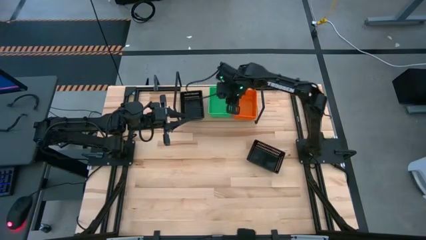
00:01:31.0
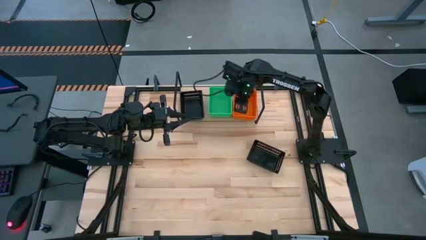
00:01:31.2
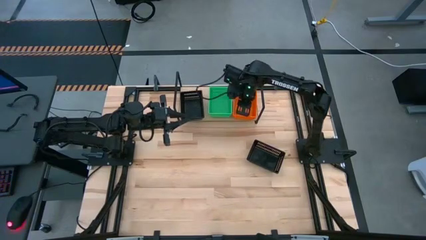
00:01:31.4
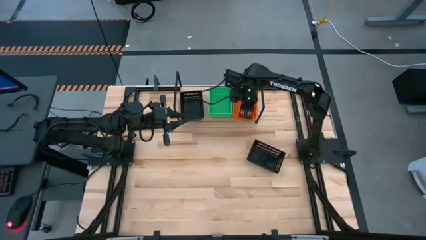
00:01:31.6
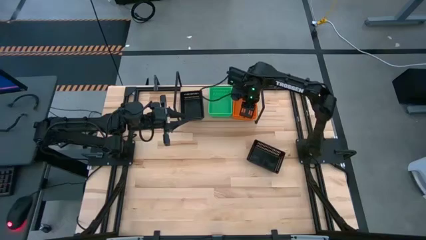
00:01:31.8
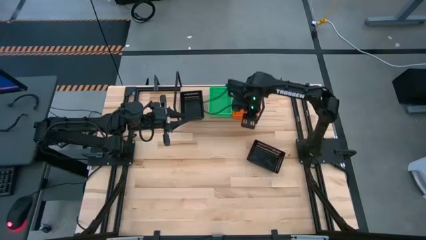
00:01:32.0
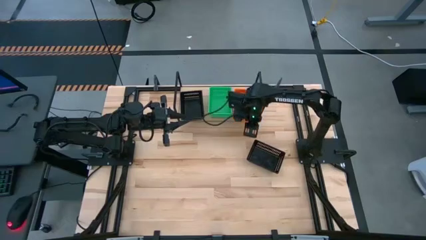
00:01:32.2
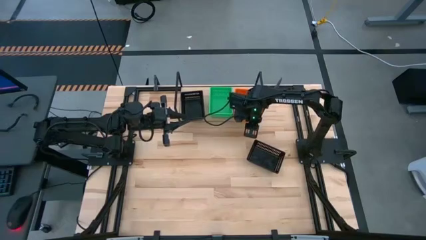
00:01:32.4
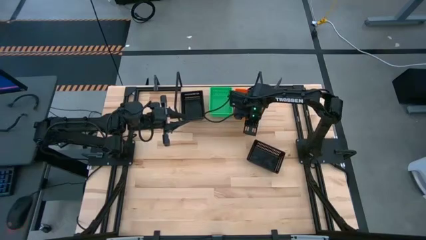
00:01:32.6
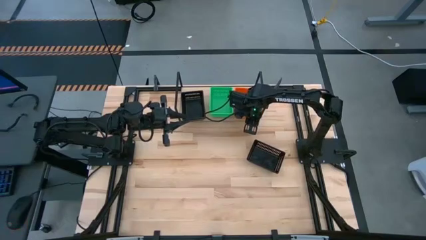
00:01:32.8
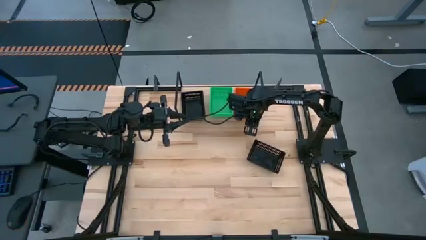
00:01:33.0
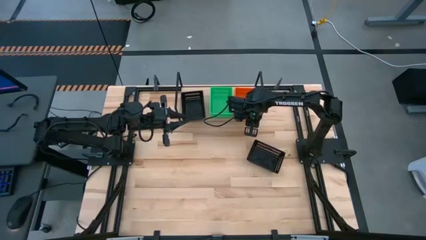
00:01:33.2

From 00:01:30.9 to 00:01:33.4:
Task: Stack baskets on shelf by color
Adjust the stacked orange bins on the shelf

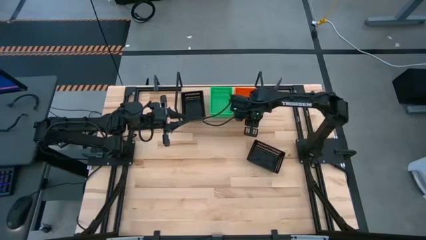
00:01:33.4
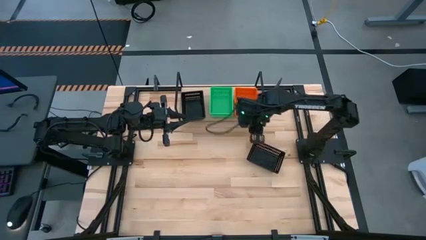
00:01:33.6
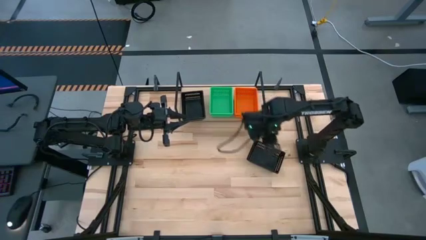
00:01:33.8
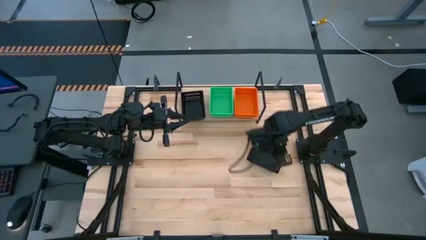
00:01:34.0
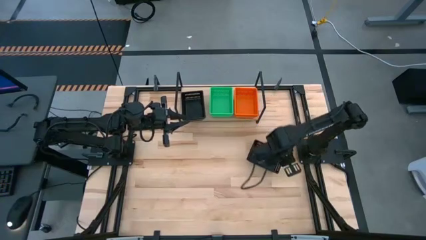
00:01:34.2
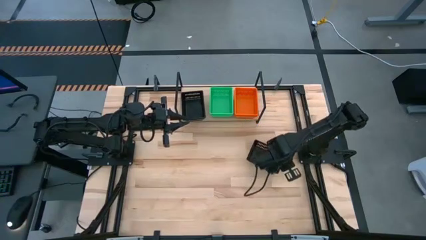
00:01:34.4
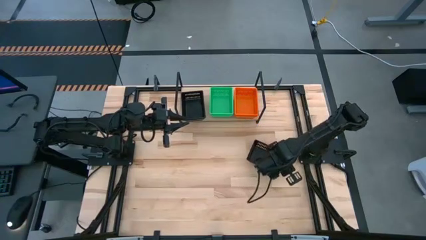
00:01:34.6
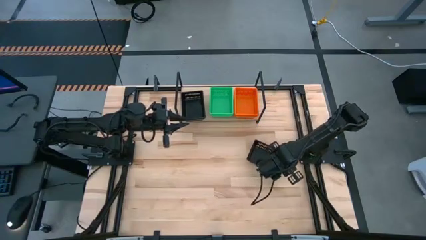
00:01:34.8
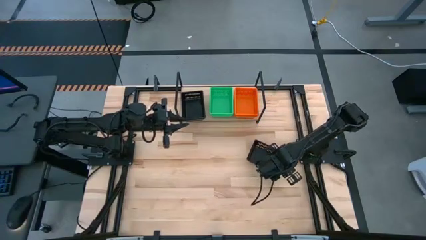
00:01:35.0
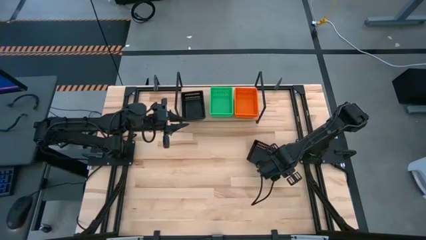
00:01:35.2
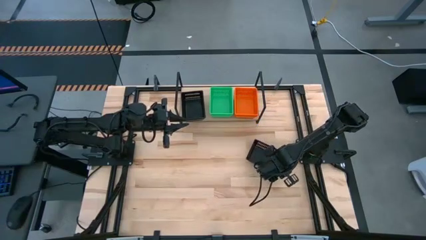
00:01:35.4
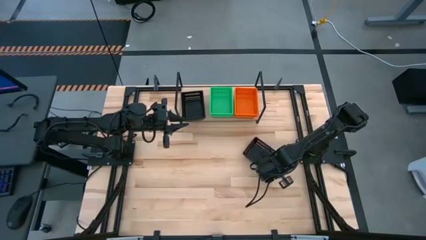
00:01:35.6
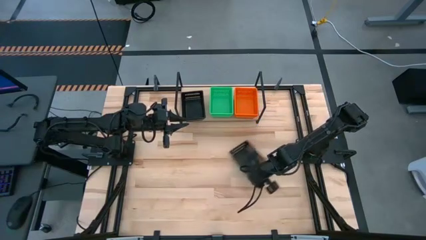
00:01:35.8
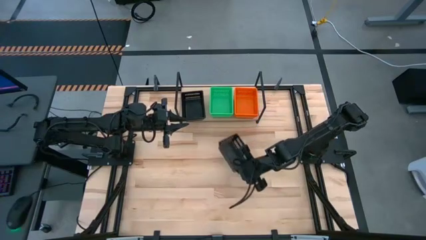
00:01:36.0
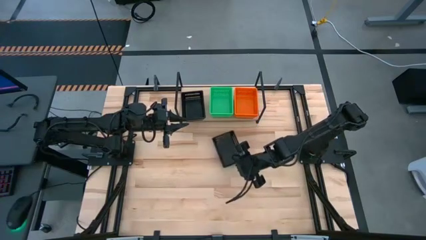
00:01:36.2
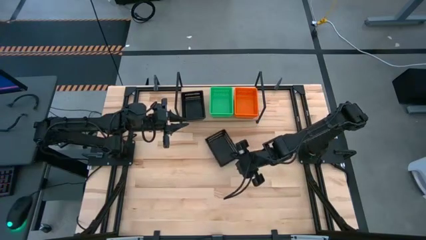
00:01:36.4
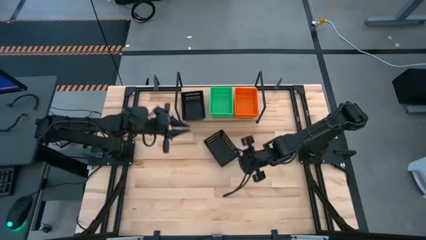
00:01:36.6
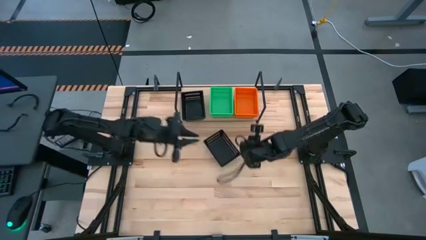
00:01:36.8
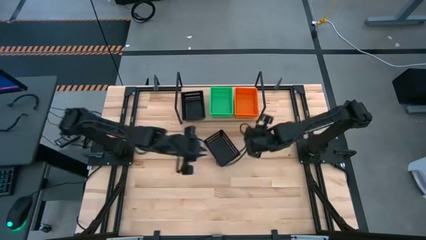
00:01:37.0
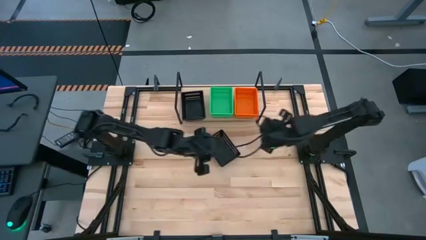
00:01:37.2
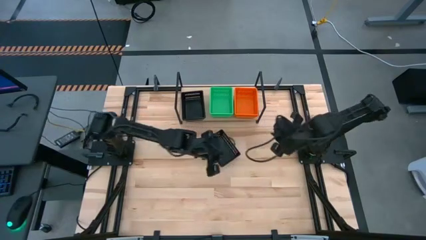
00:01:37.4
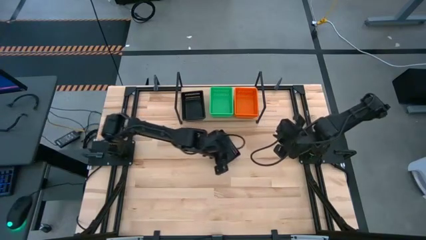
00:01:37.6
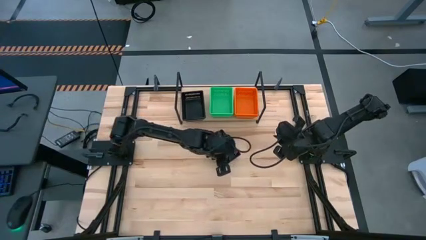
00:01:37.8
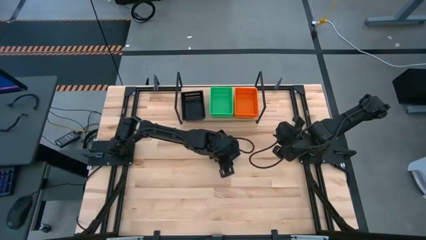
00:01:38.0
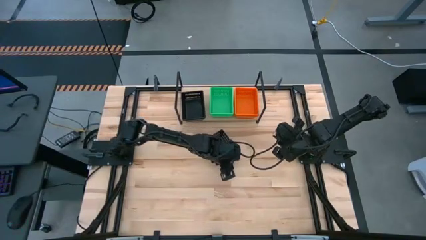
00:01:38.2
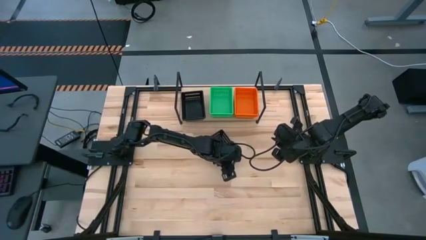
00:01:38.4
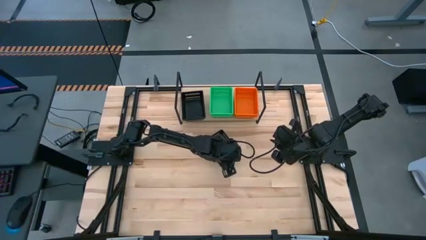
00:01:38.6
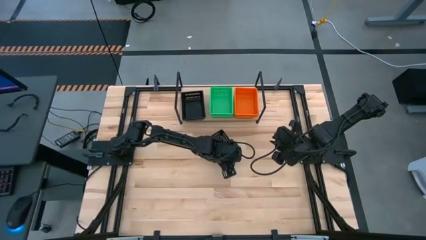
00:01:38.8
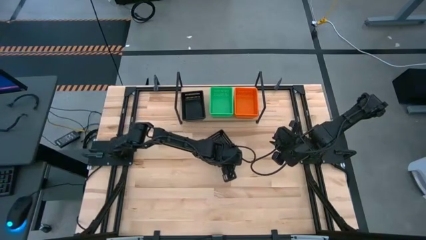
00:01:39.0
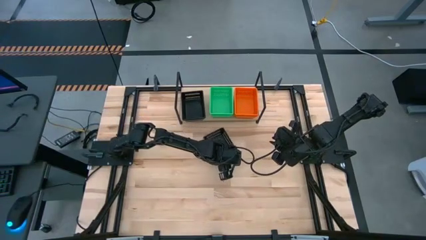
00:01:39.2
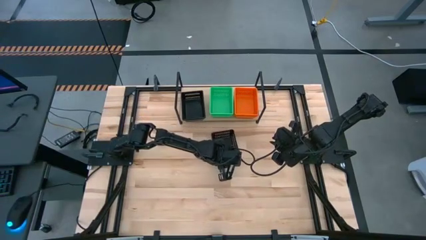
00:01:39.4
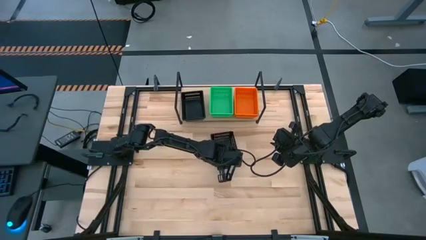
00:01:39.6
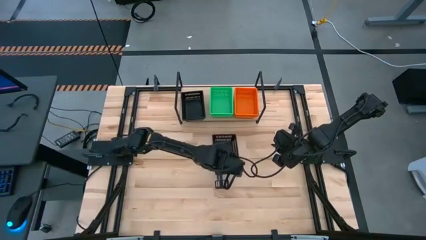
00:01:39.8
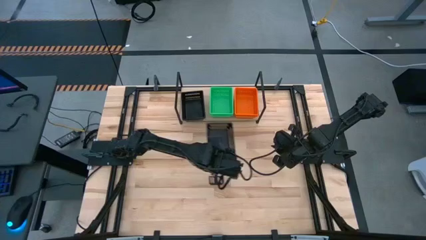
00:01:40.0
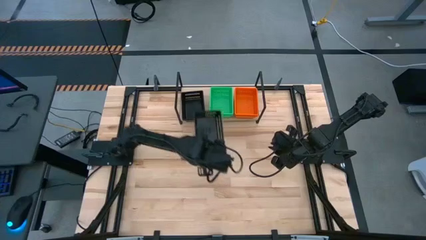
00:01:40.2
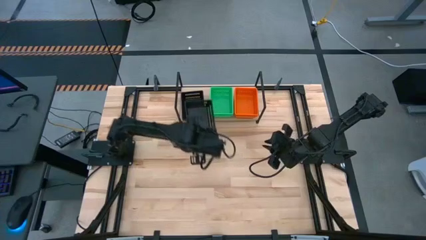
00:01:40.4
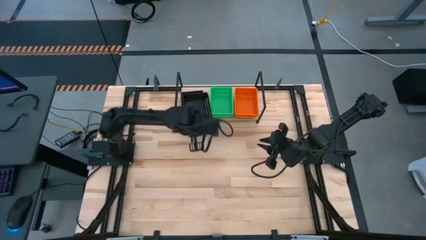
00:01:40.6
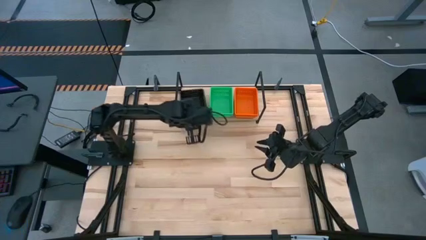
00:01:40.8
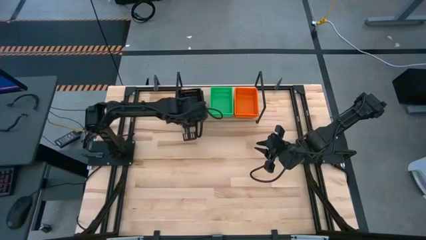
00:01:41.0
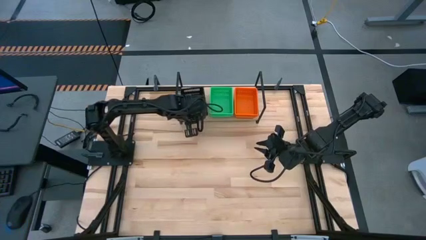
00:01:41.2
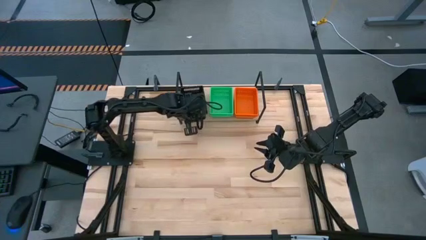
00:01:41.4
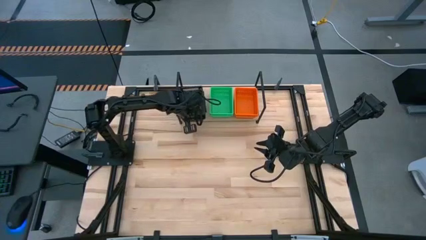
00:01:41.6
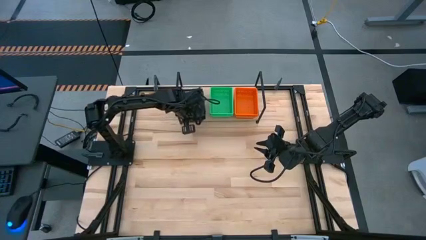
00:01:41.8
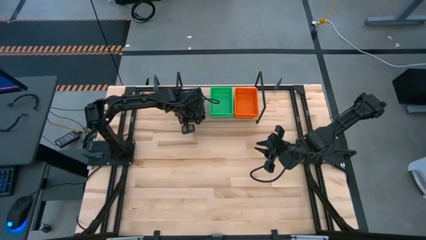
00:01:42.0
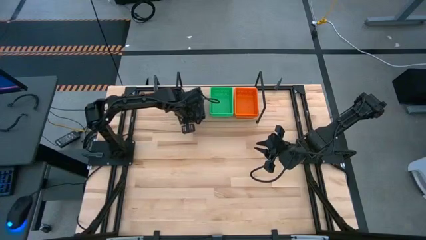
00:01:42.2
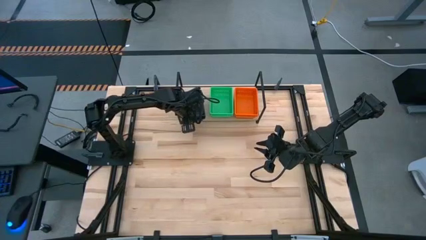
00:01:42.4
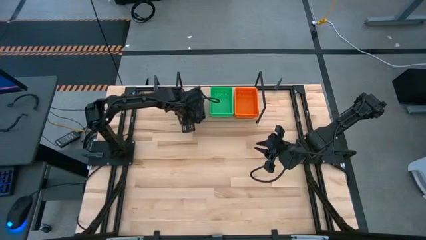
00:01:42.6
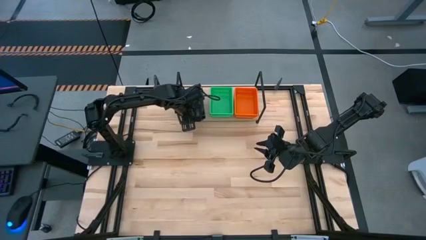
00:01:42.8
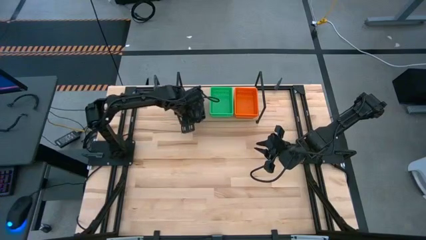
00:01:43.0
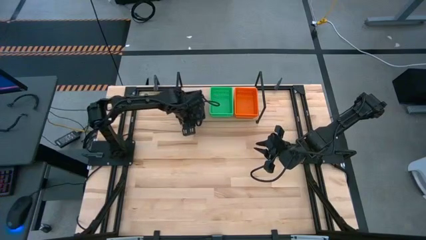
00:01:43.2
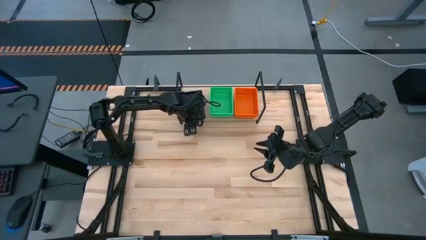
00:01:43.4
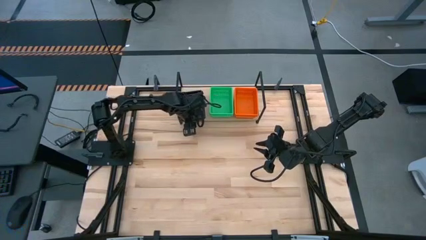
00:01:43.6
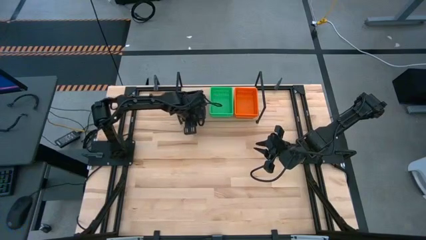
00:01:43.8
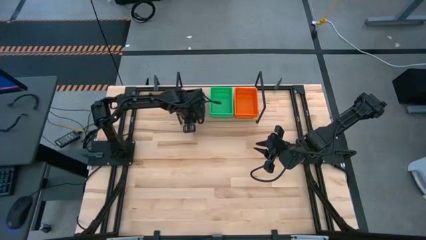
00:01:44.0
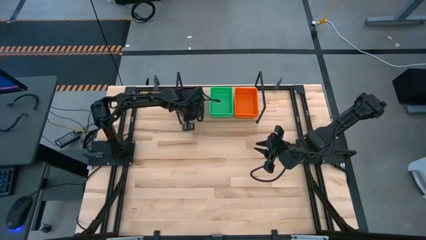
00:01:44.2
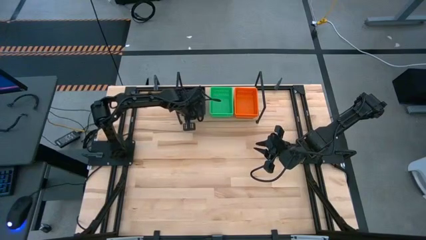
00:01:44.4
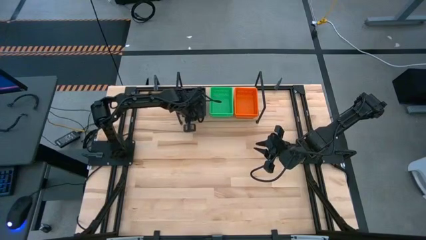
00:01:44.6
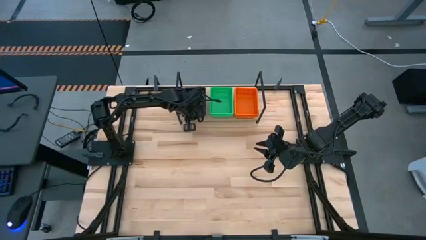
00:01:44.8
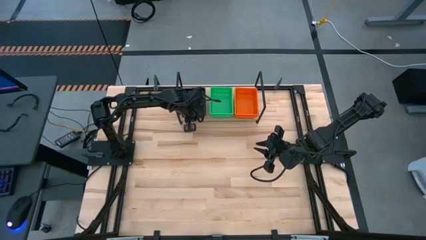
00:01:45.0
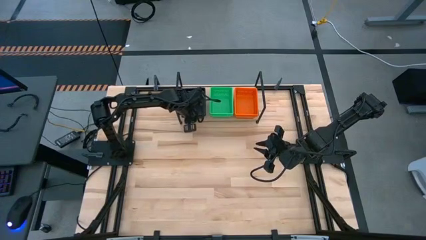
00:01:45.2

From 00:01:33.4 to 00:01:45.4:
Stack the black bin on the black bin on the shelf

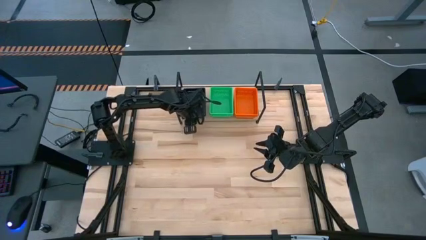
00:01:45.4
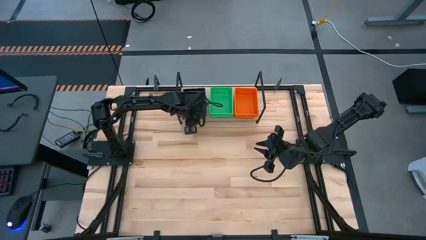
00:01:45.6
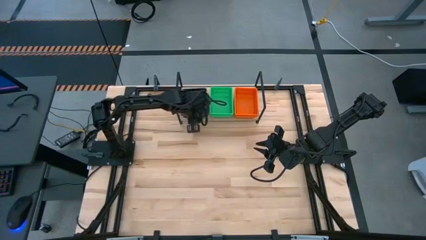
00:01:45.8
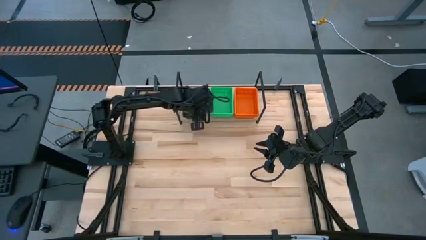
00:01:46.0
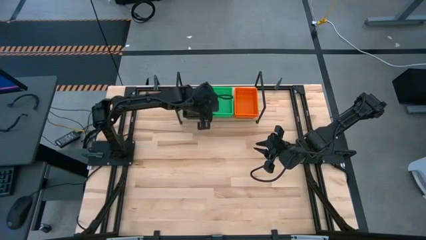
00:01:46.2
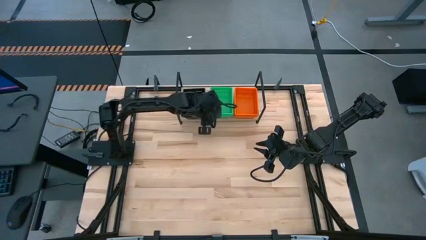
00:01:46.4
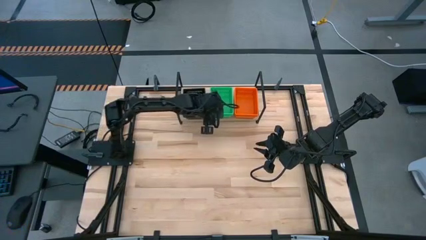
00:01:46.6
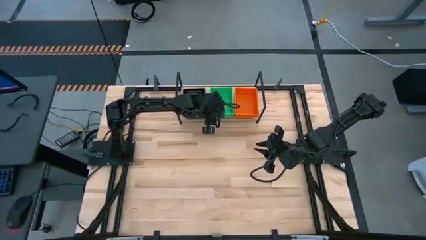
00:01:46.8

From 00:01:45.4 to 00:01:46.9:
Adjust the stacked green bins on the shelf
